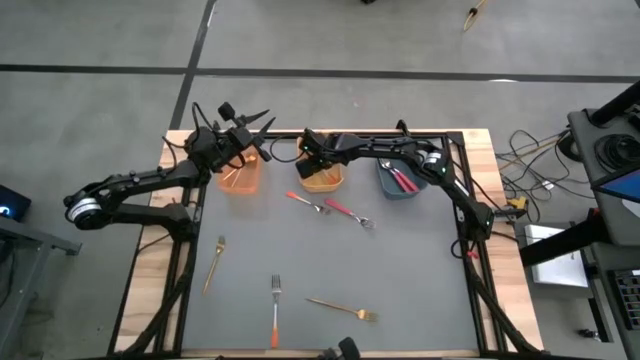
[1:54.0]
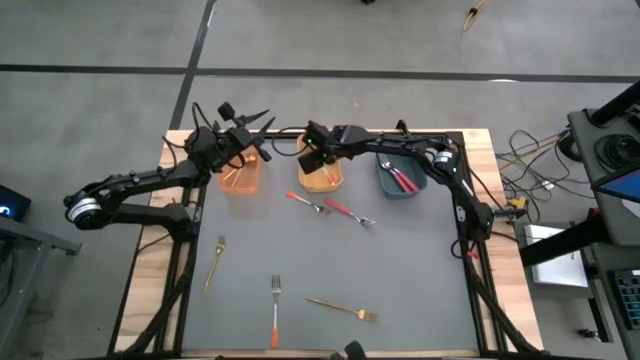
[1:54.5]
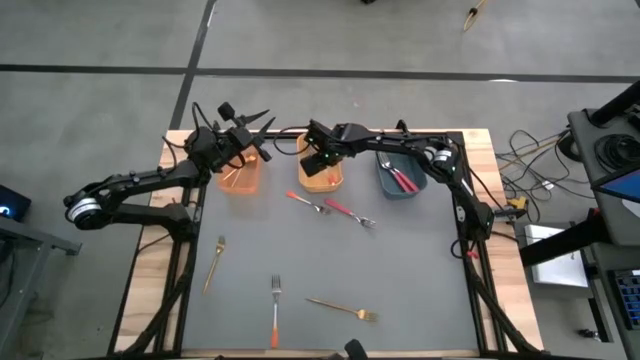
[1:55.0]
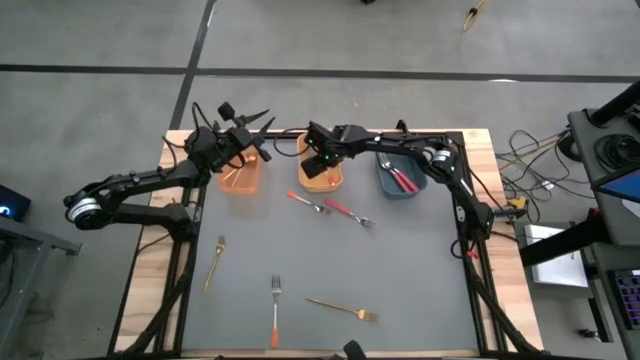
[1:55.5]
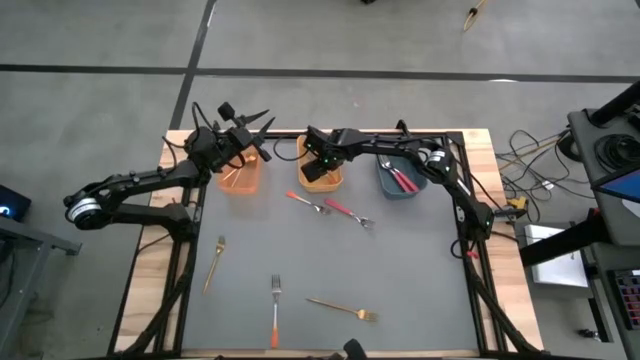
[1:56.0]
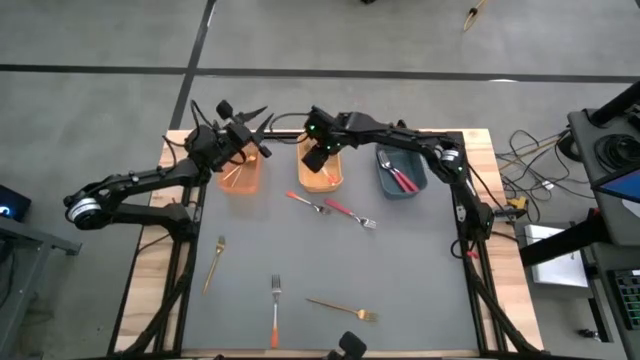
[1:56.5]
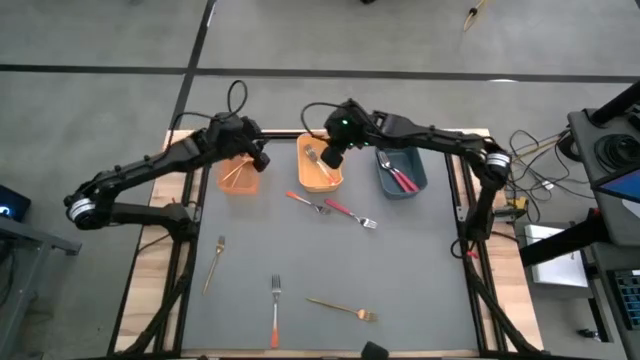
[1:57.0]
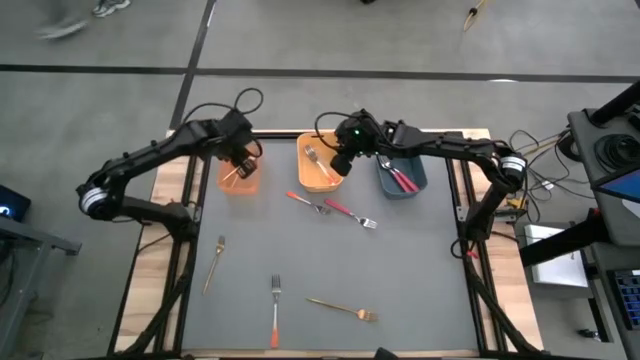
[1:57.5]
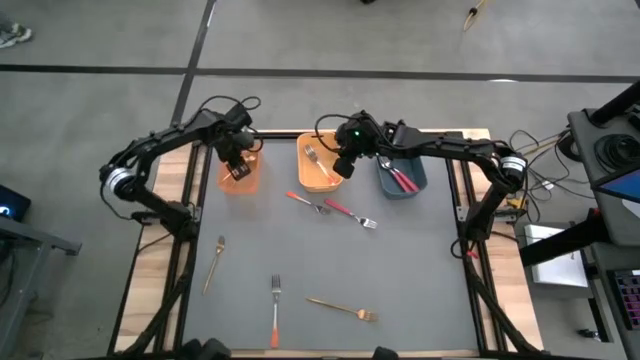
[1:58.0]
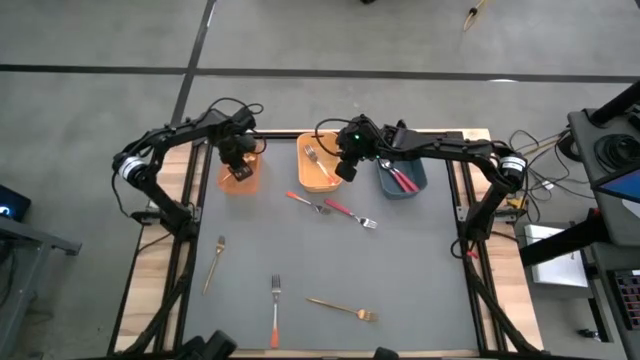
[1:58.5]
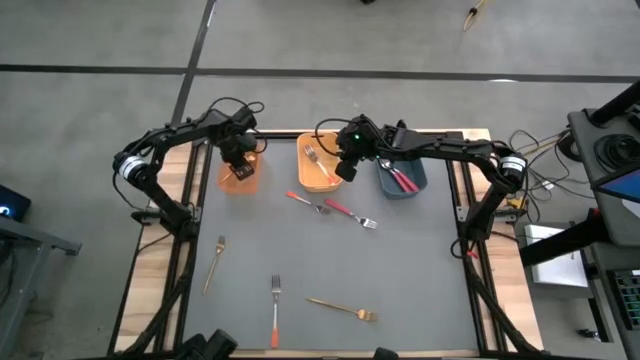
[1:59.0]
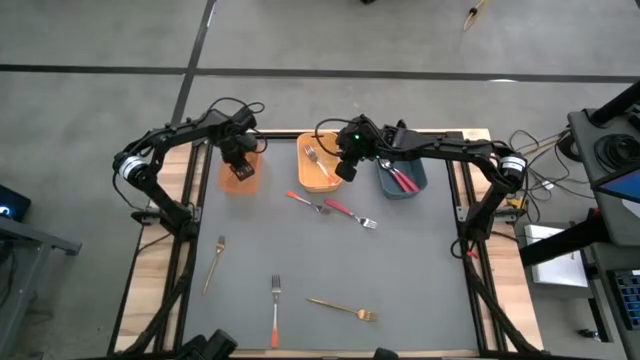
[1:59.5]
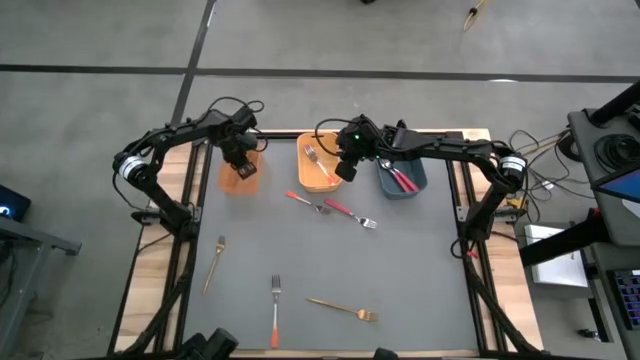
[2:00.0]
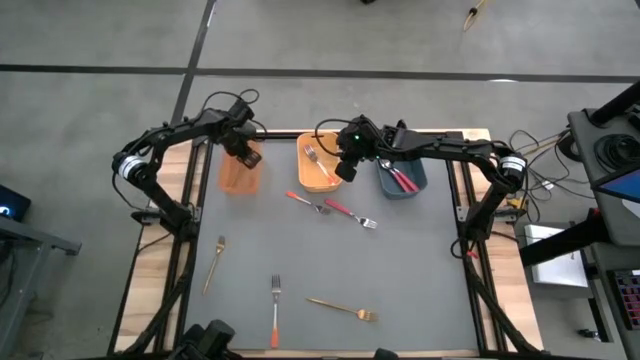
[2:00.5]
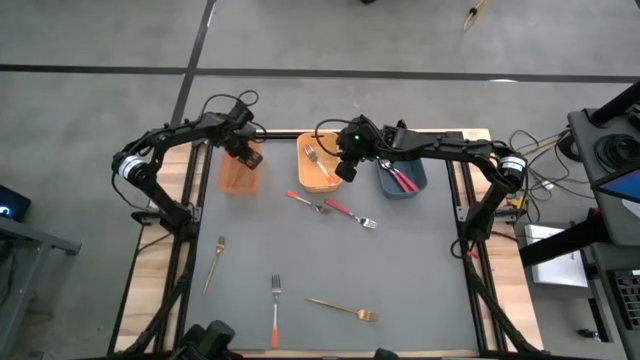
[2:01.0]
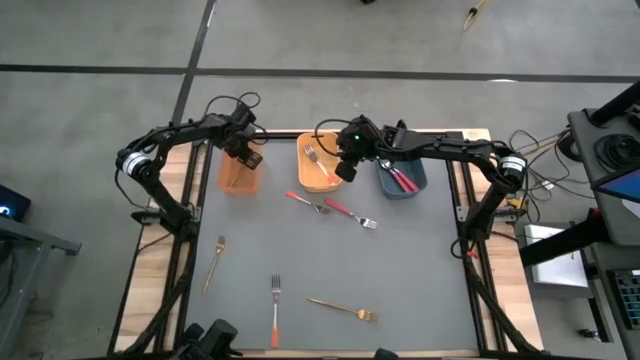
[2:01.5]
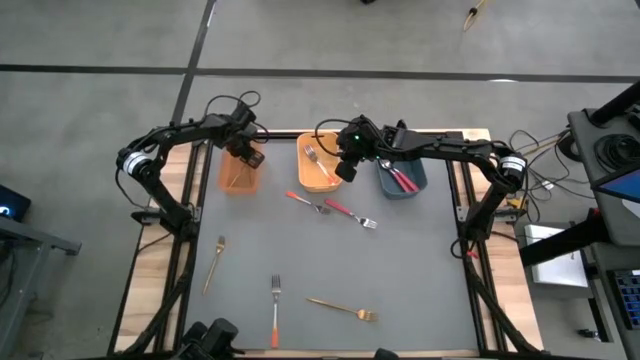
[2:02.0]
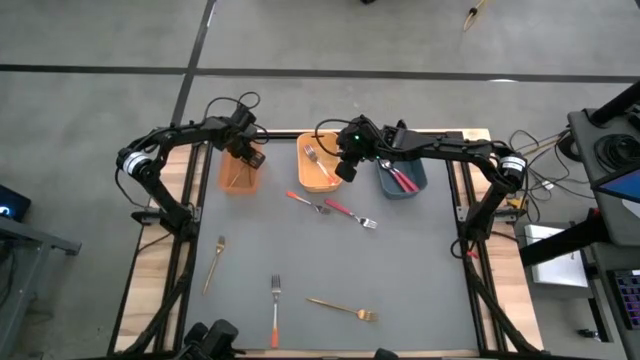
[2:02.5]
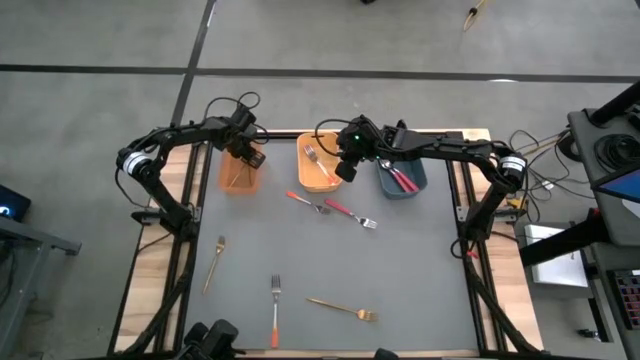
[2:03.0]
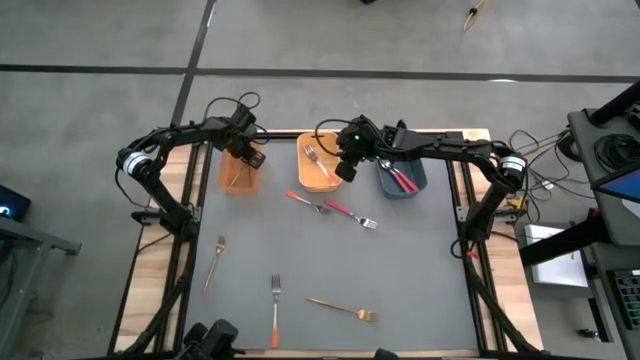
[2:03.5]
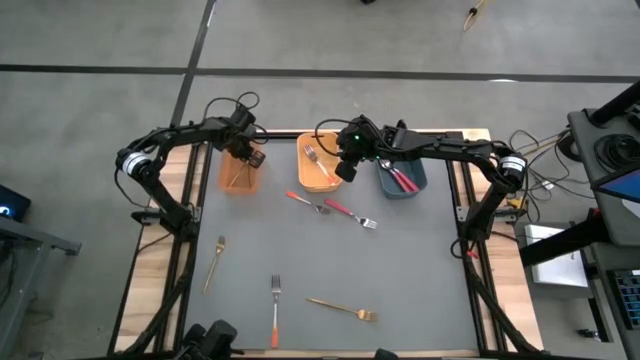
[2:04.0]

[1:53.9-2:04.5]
Task: Sort silverware by color (type)
Adjust the gold fork in the orange bin

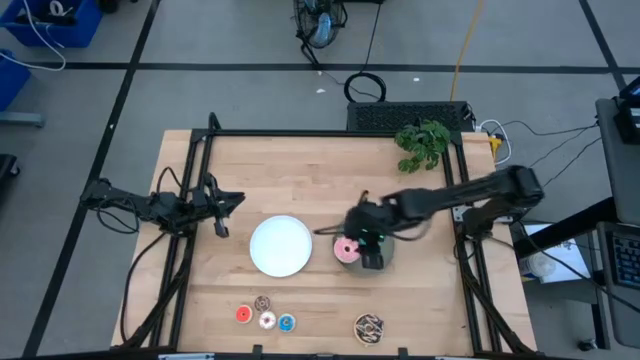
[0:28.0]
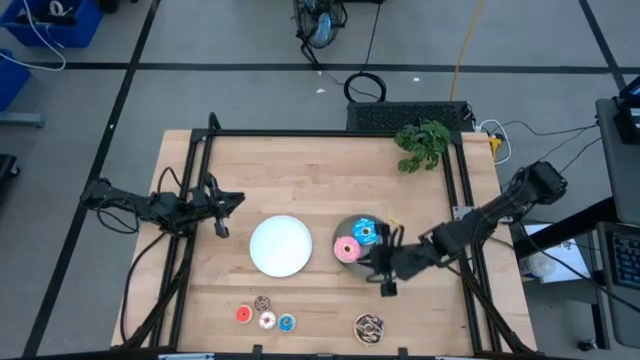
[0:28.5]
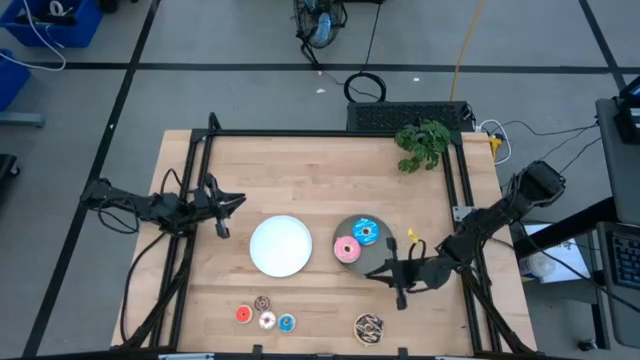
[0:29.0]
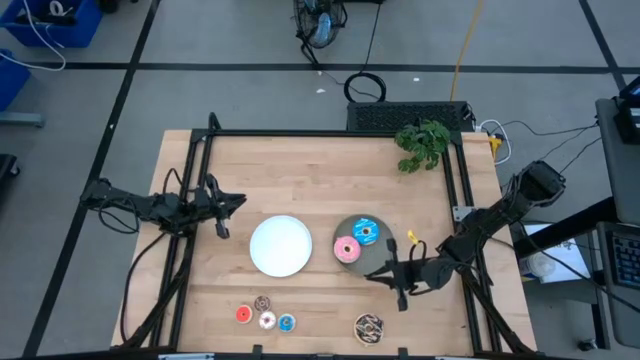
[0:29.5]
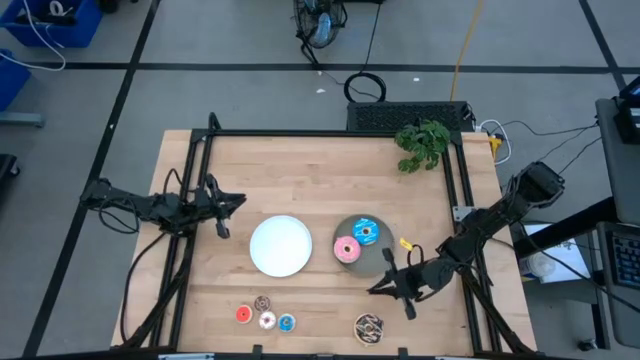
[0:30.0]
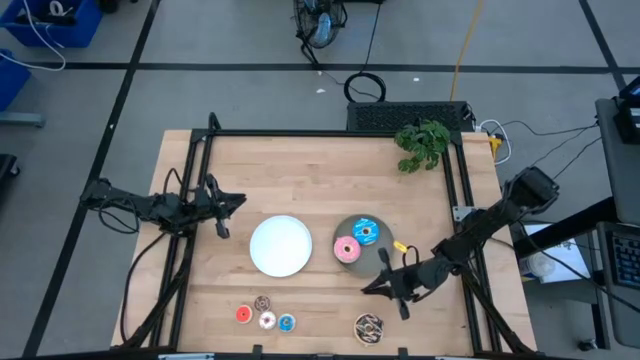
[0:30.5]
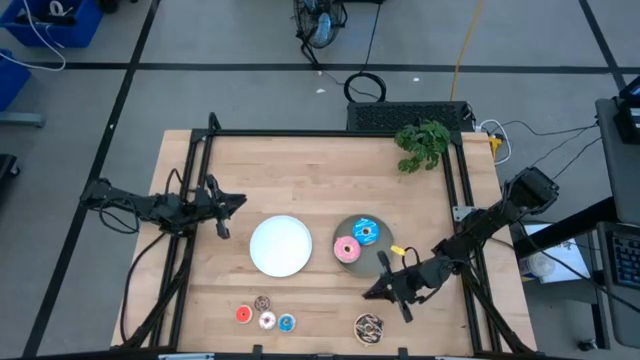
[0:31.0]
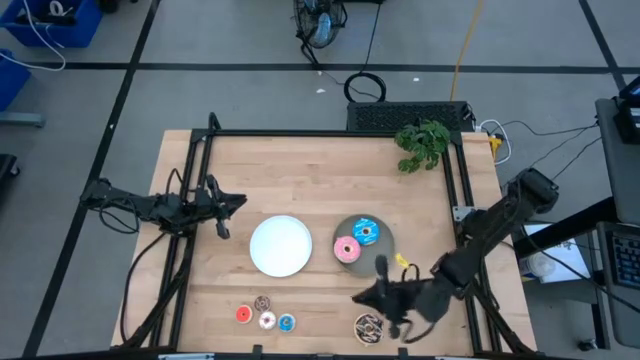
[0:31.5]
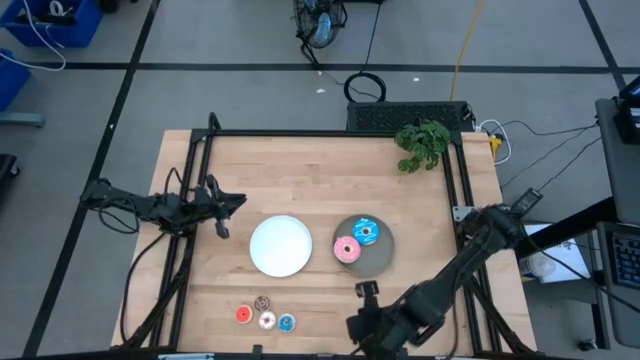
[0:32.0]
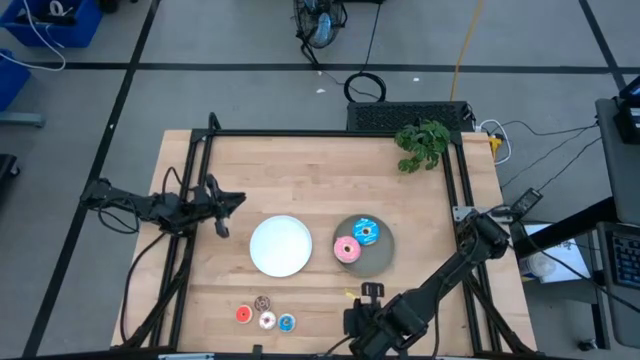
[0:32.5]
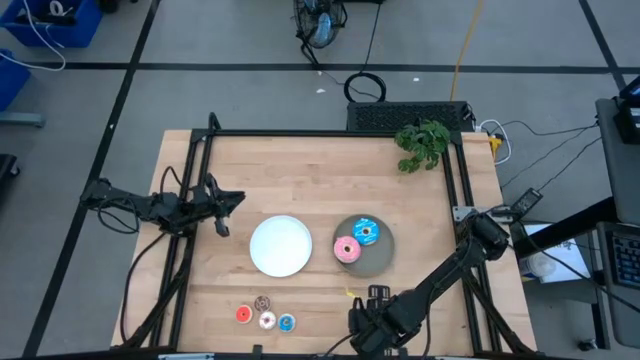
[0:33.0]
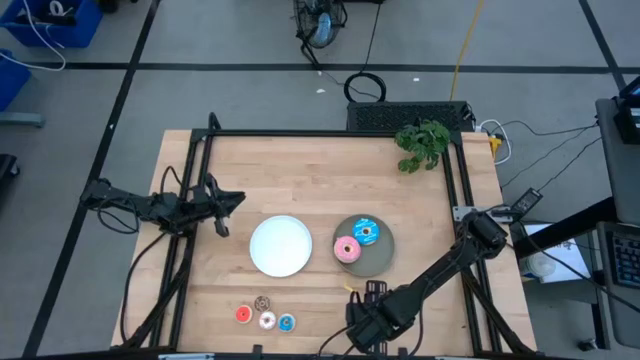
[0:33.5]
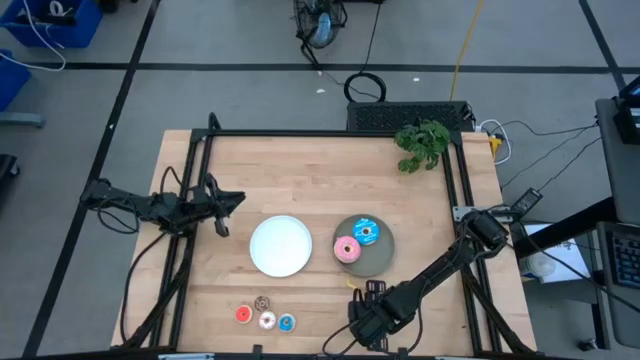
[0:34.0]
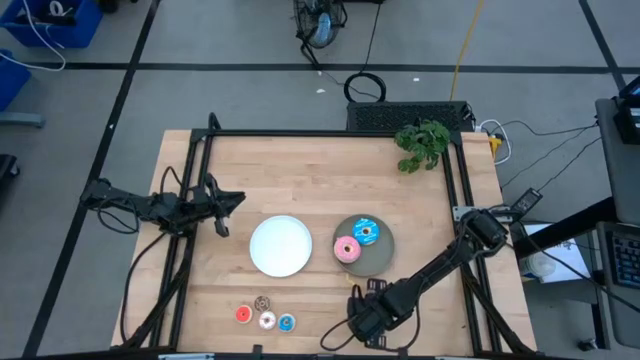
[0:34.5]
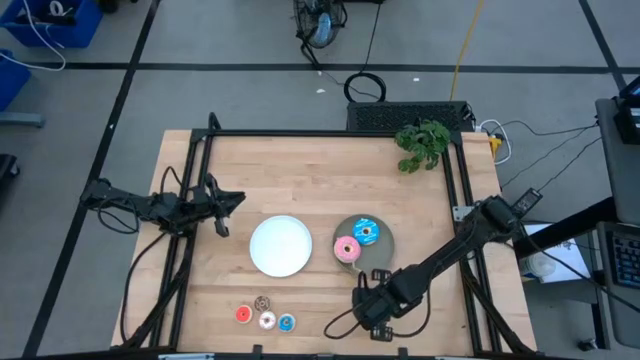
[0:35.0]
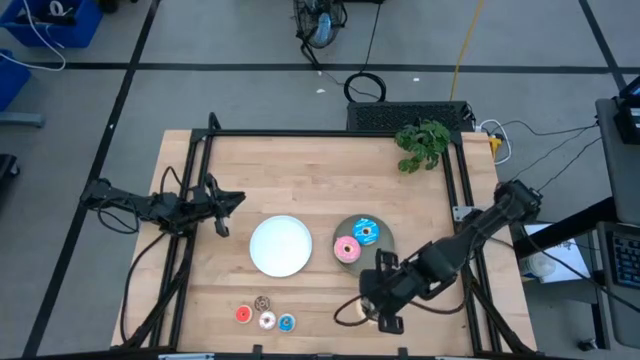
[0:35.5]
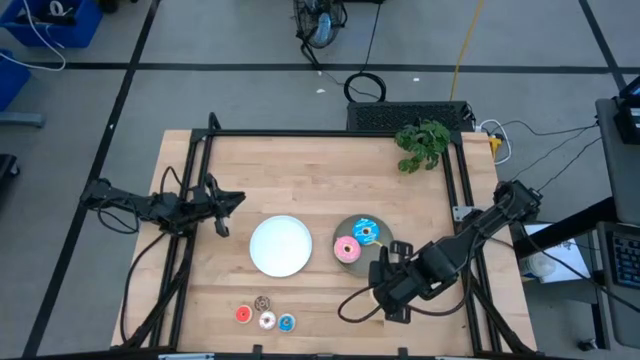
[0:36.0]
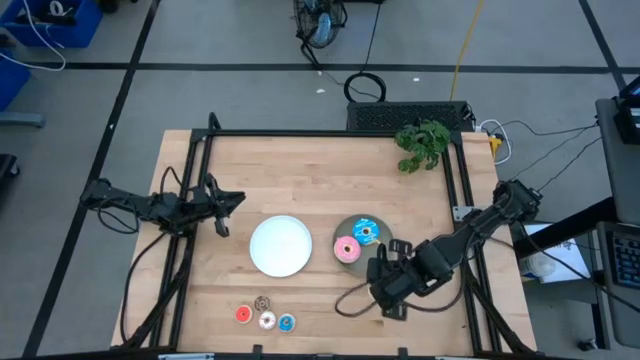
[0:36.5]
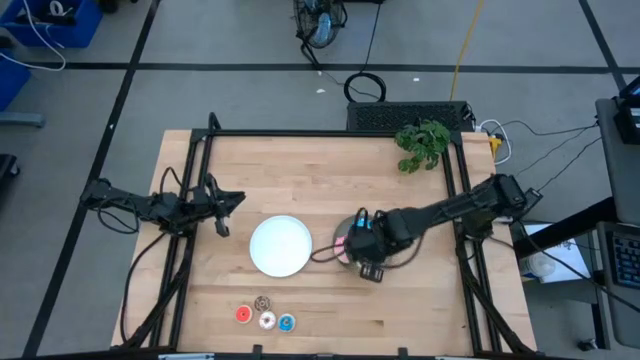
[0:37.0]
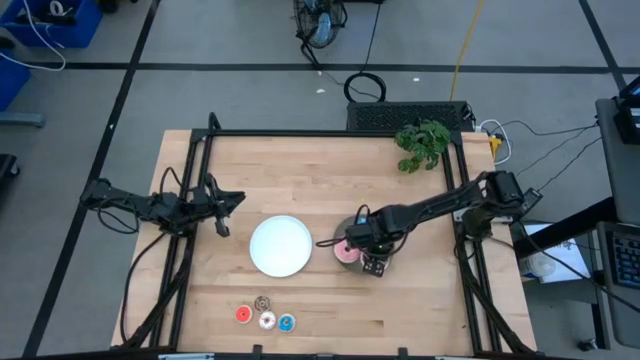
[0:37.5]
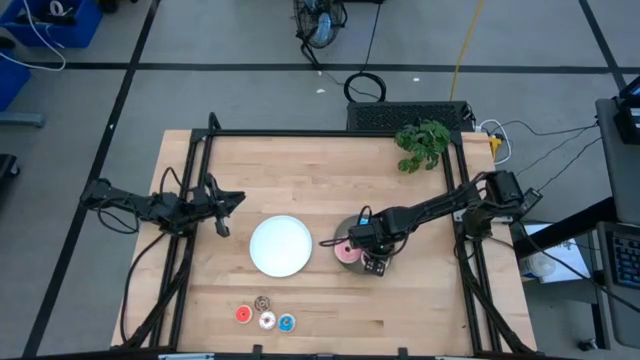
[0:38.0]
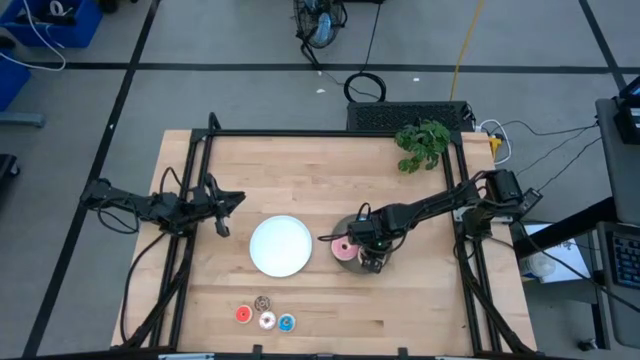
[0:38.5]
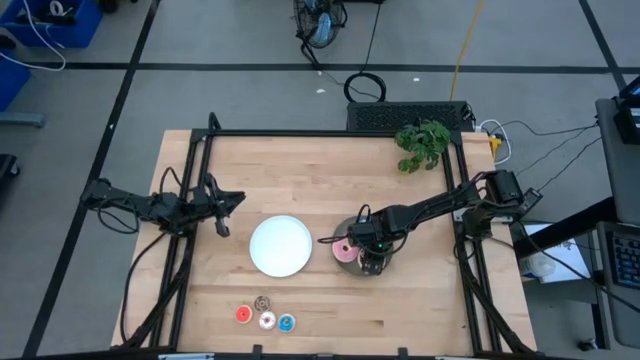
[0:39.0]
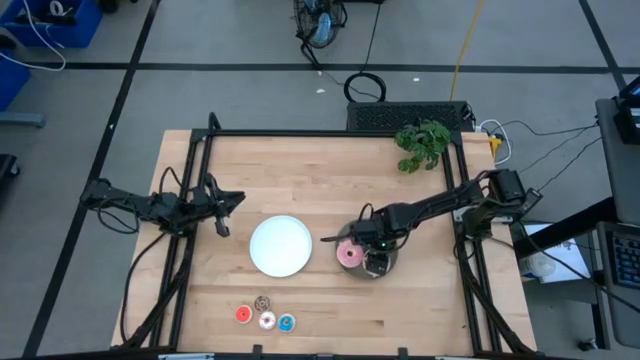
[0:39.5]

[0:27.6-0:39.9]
Task: Pick & Place donuts
Put the large black donut in the gray bin
